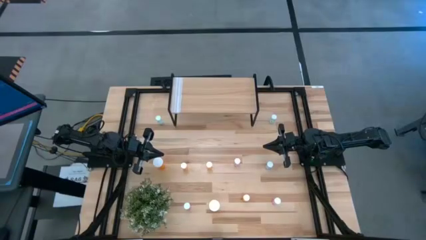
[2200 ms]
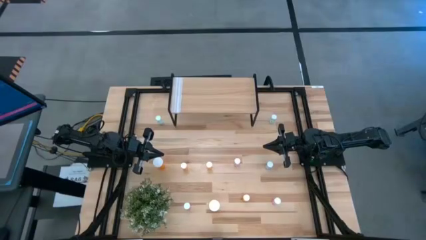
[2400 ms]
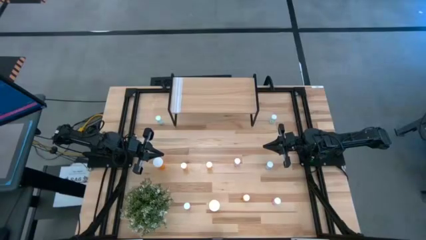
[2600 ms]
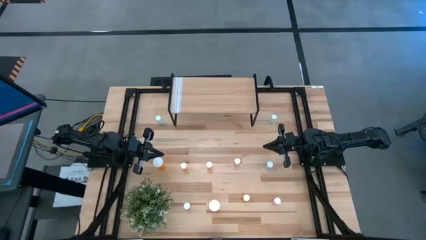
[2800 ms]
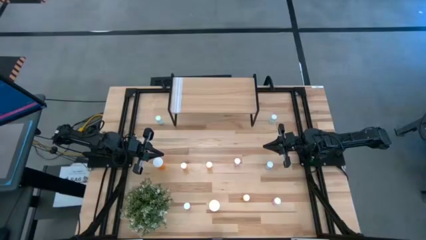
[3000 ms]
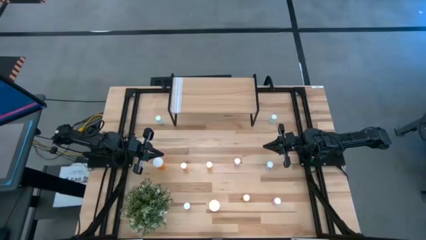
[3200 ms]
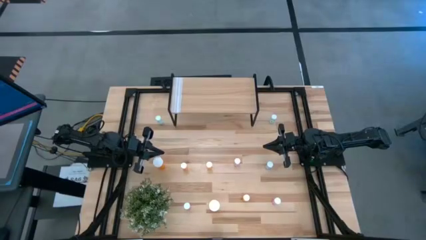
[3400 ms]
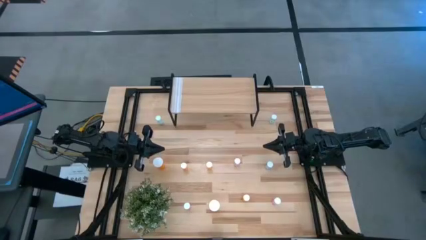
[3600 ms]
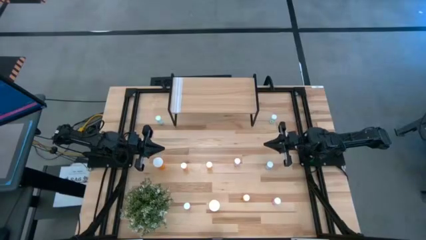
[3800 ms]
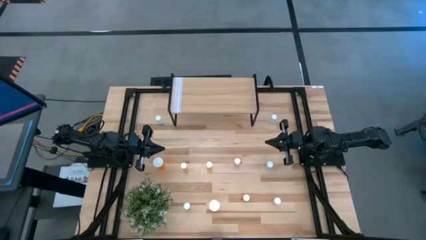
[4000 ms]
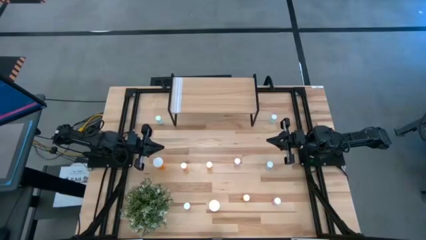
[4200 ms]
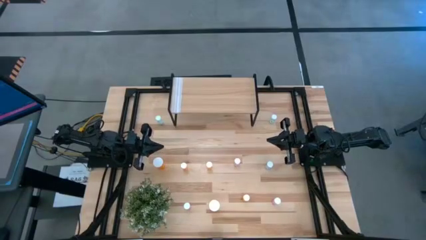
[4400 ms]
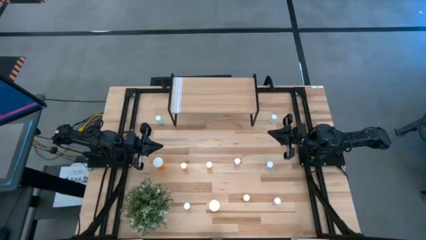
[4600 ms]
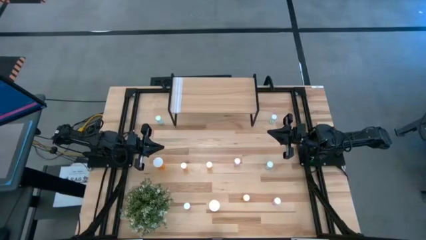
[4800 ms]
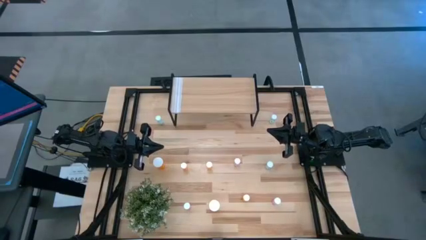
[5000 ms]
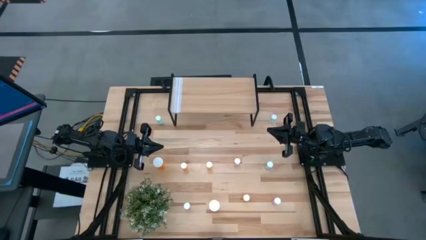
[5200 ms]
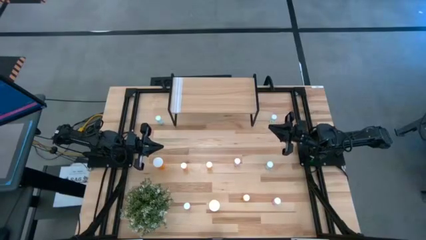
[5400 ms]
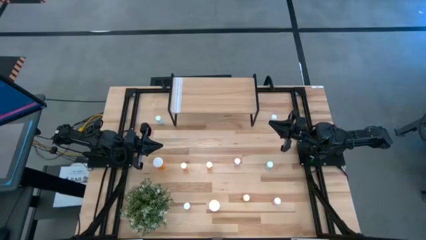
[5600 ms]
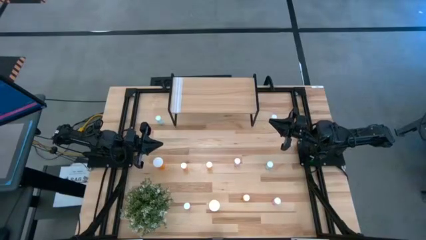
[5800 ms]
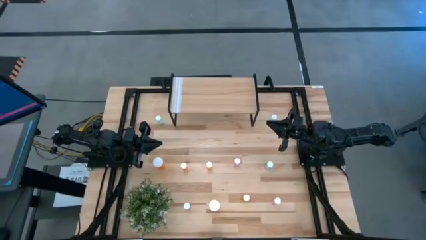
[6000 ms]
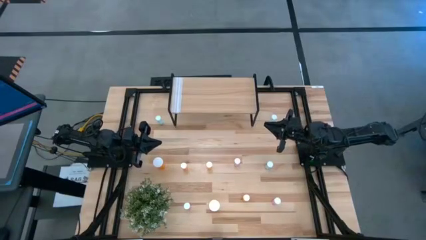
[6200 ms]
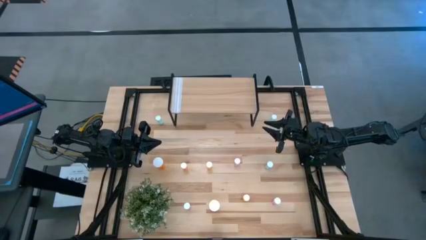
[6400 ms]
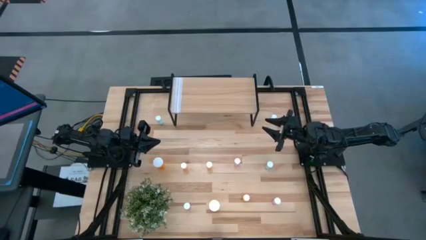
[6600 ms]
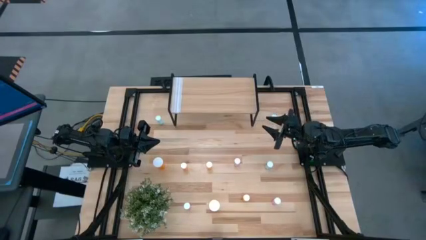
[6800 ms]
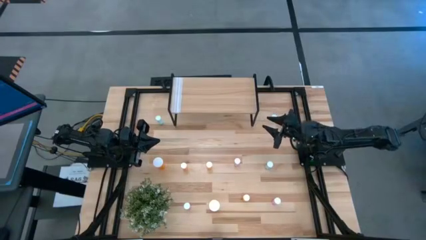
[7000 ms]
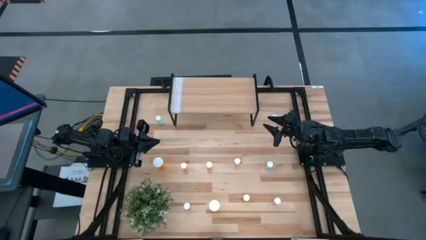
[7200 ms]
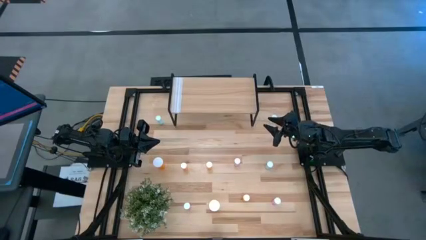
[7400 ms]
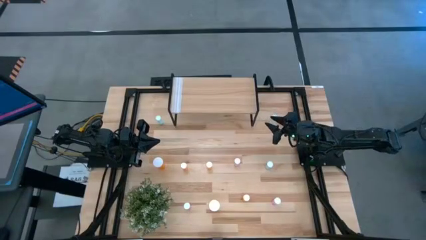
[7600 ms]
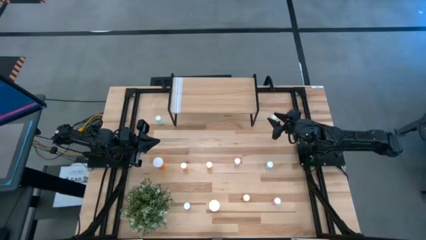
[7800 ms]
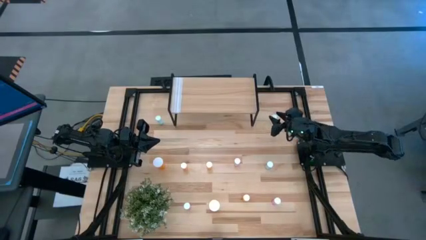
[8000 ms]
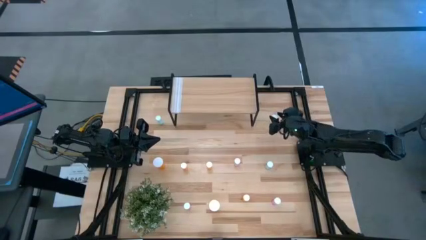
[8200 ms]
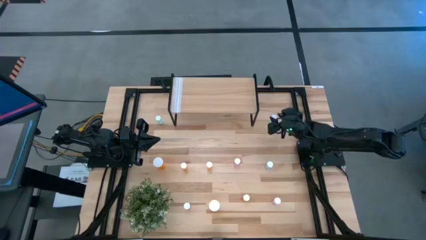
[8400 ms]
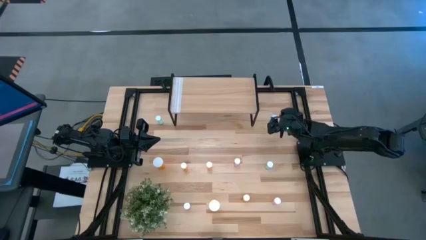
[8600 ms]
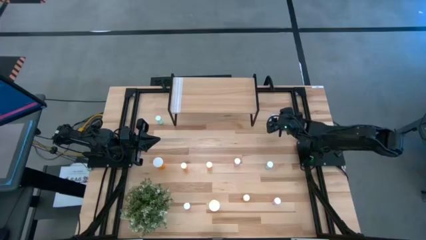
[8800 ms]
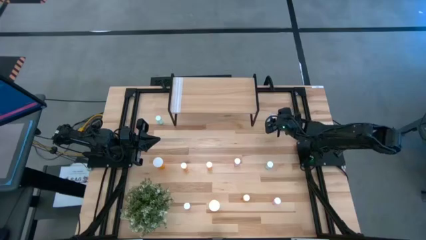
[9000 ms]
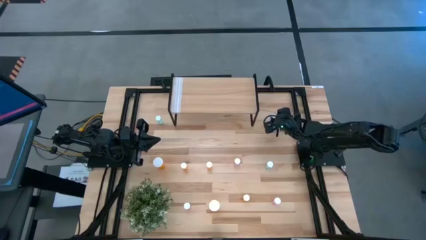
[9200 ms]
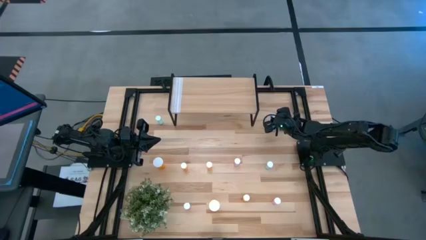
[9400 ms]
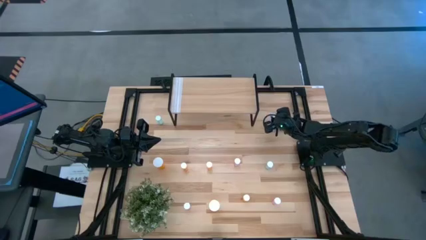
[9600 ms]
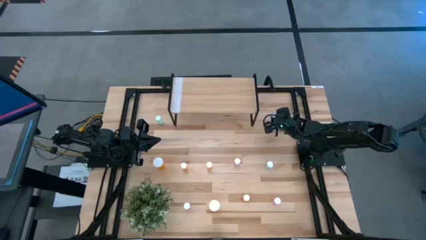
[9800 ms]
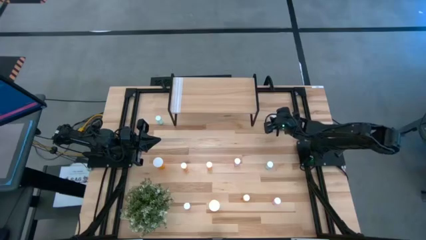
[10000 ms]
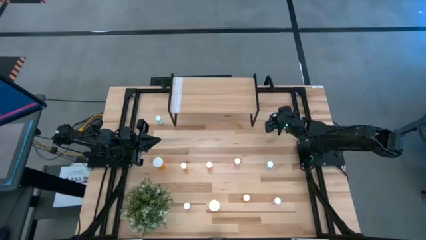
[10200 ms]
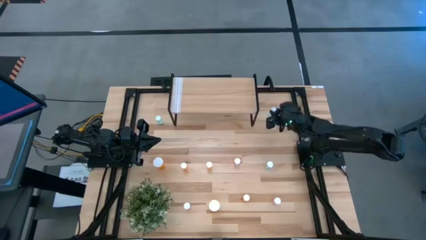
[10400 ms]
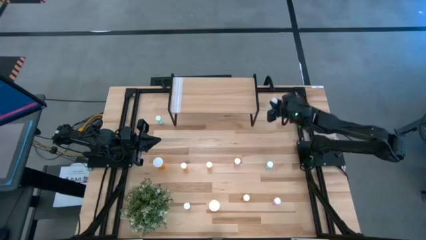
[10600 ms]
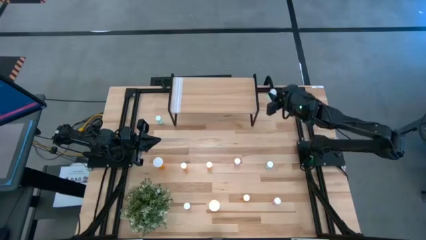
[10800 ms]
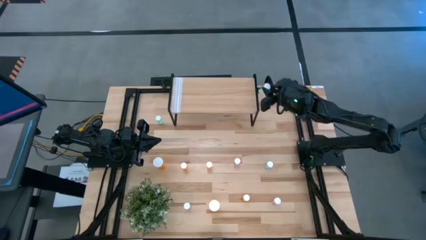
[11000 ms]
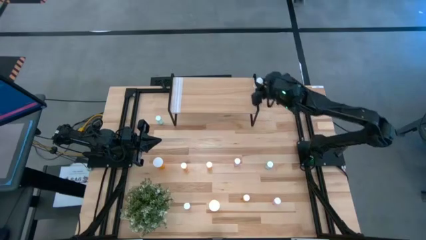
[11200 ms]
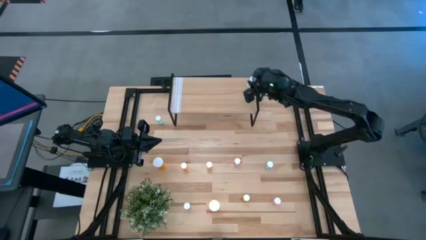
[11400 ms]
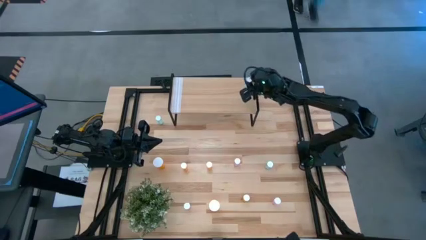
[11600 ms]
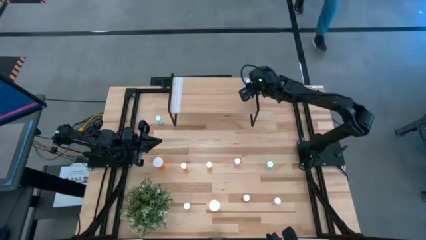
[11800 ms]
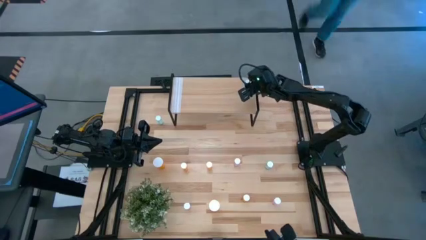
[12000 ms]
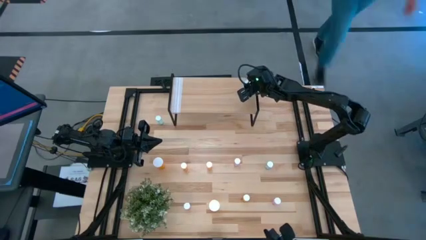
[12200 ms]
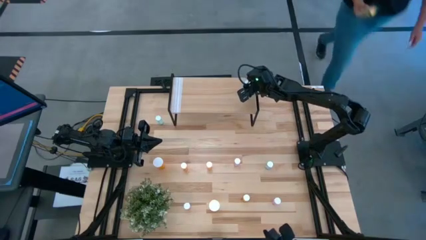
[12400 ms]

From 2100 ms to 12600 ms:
Task: Pick and place medicine bottles onto shelf by color
Put the top right blue bottle on the shelf

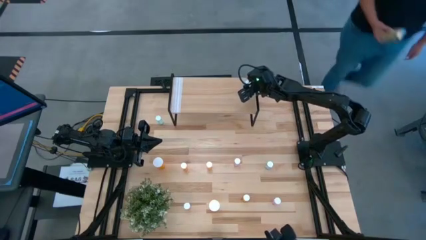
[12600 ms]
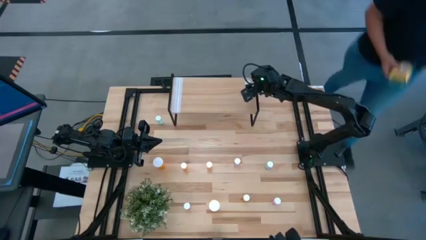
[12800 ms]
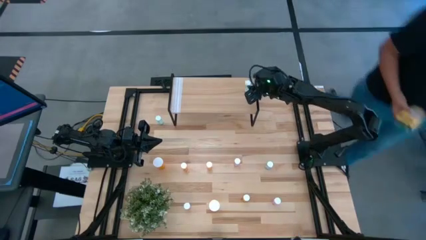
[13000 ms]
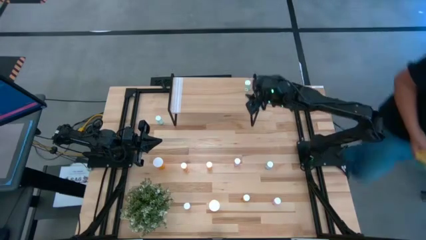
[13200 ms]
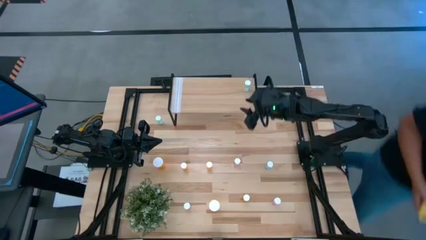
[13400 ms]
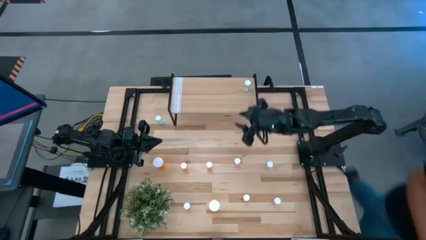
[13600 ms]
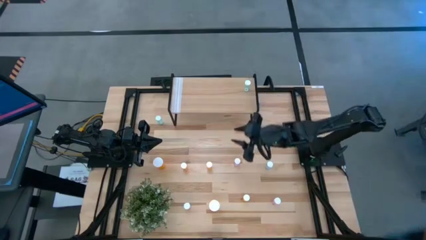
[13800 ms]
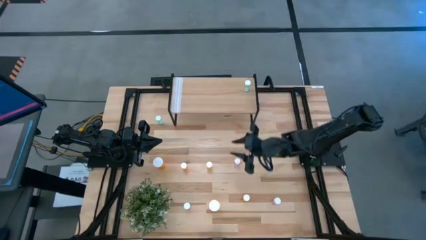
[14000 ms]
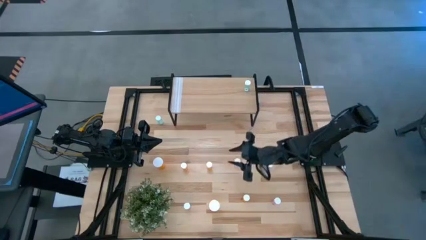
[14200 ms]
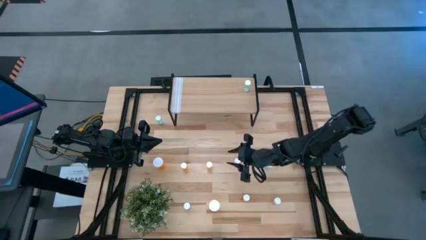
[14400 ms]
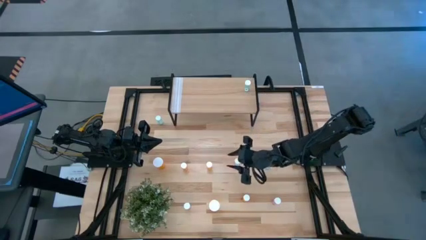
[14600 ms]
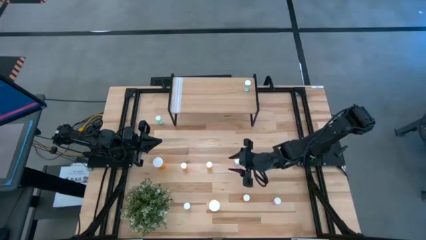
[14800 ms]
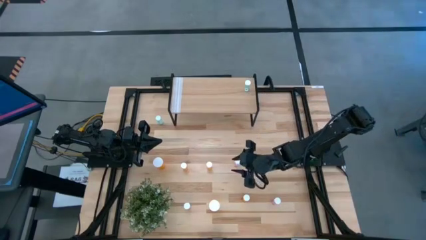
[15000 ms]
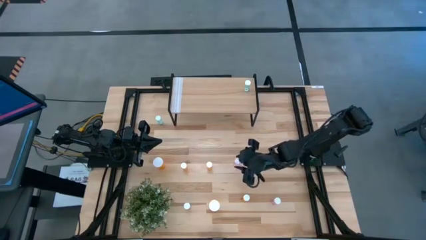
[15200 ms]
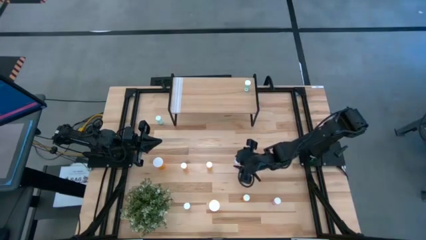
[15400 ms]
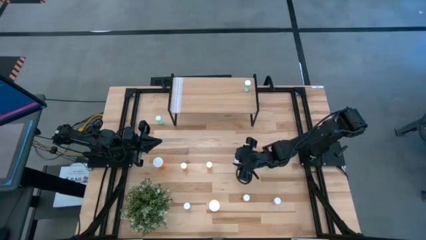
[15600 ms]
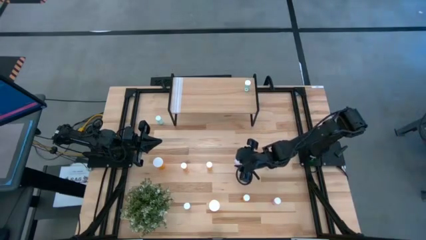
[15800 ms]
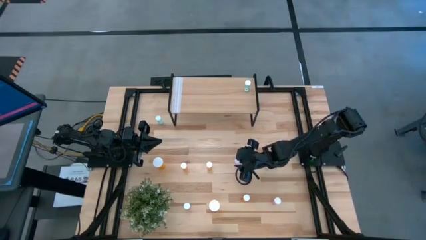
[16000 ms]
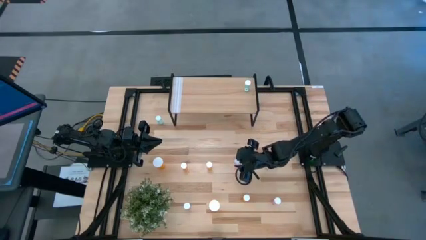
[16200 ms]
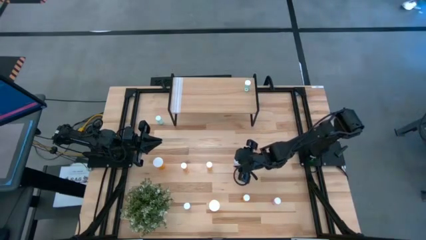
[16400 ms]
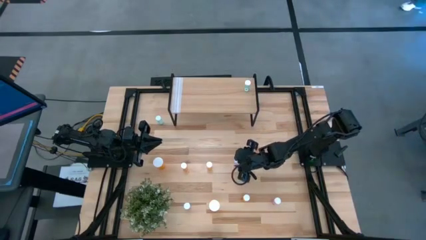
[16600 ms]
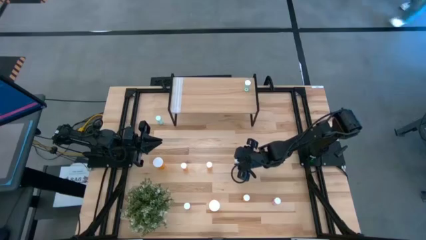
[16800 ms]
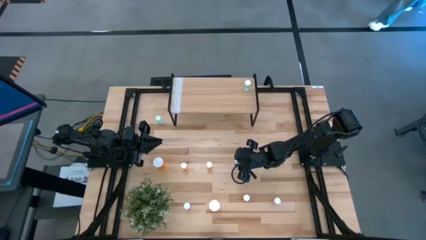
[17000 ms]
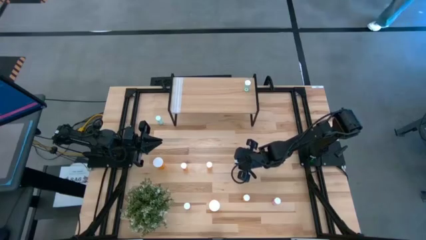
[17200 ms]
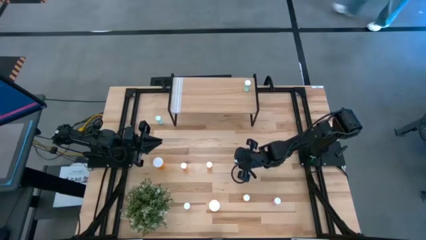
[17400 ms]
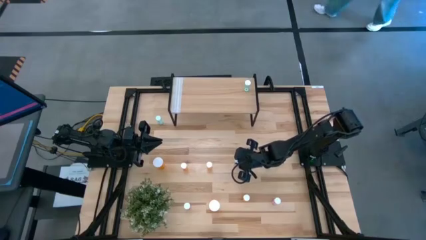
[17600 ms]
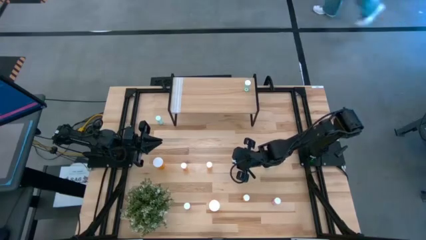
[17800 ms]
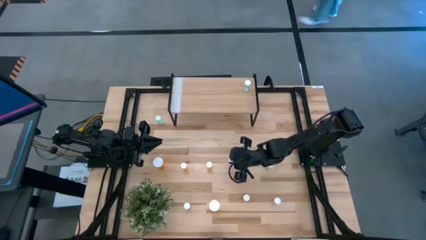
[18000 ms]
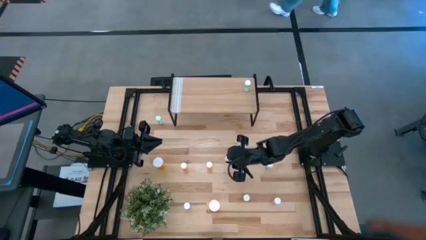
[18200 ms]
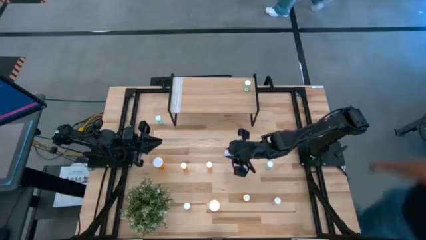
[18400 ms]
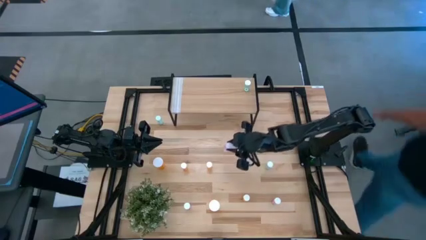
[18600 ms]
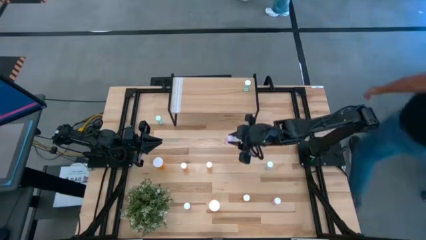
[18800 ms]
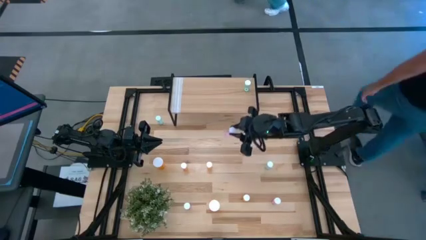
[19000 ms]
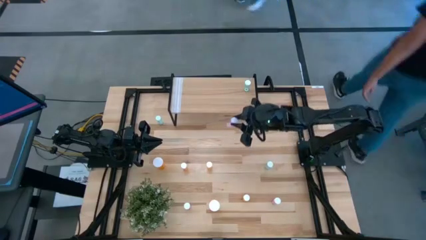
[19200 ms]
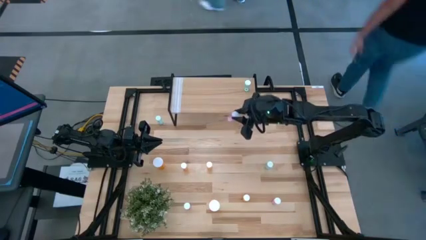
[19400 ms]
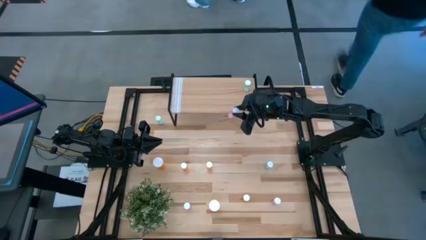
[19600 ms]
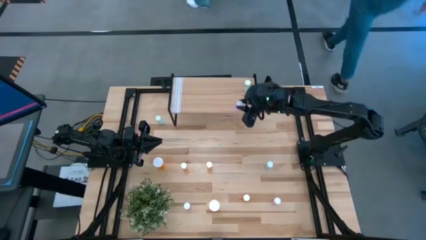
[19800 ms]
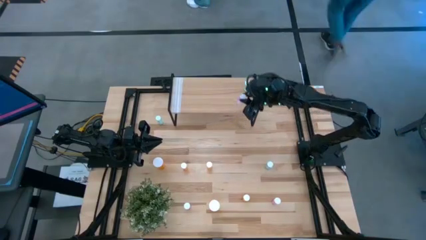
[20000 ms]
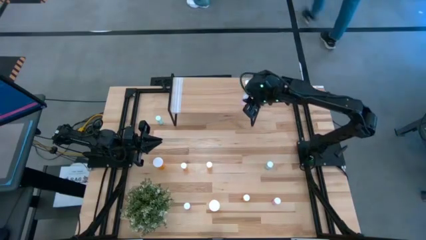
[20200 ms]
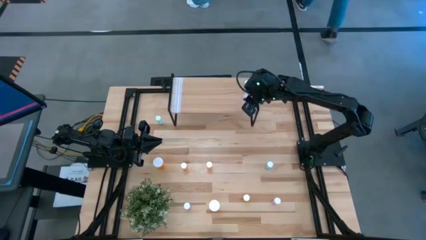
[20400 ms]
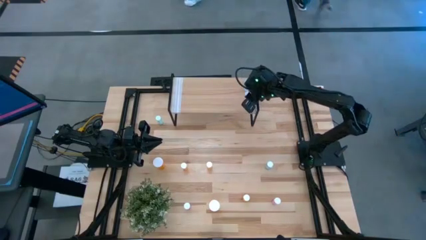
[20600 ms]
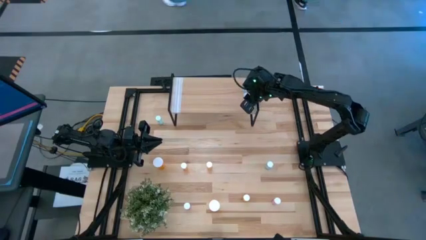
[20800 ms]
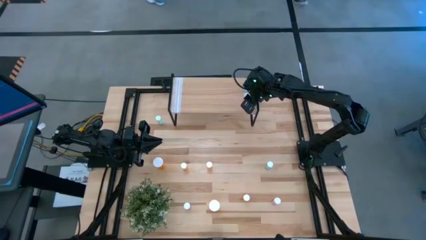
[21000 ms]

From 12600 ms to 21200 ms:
Put the top violet bottle on the shelf
